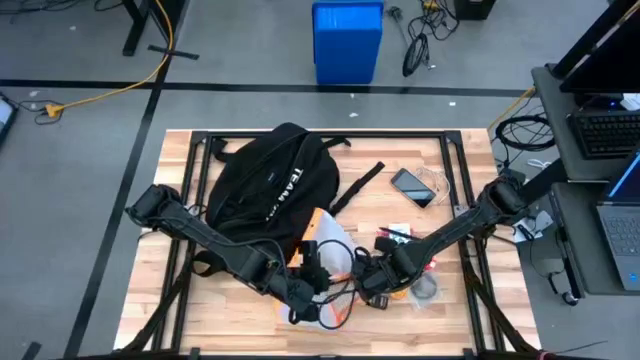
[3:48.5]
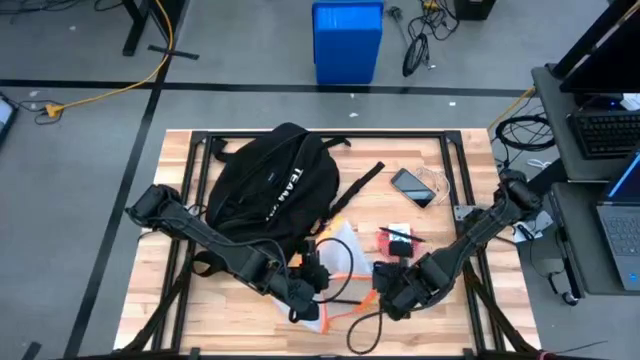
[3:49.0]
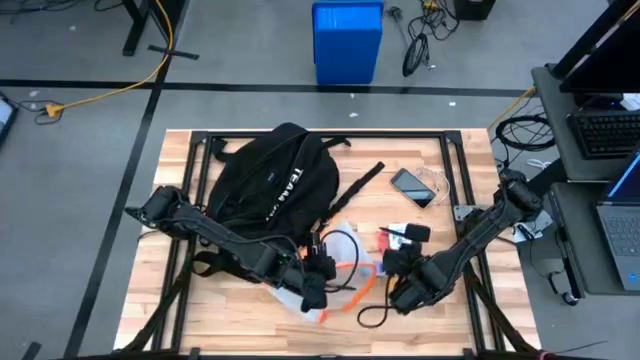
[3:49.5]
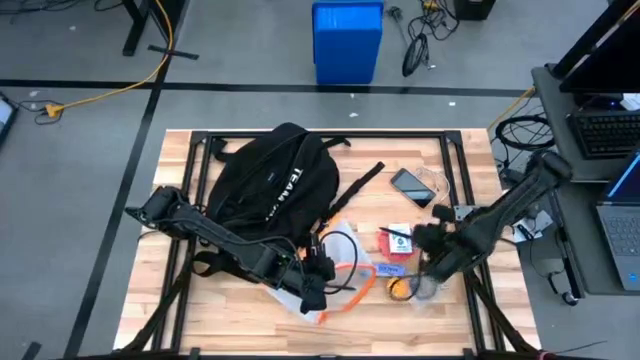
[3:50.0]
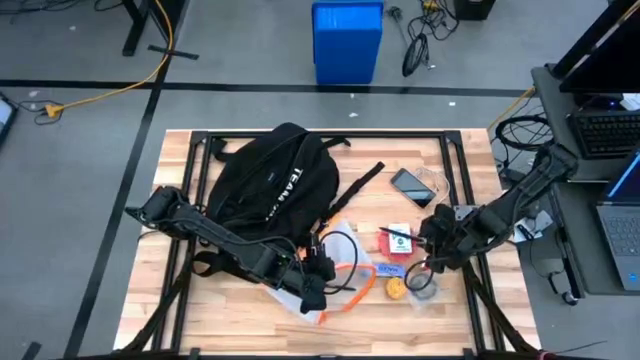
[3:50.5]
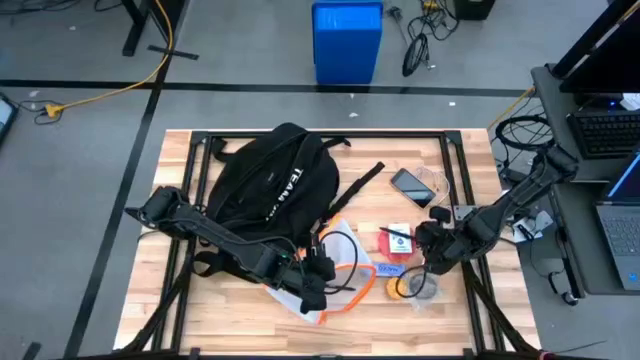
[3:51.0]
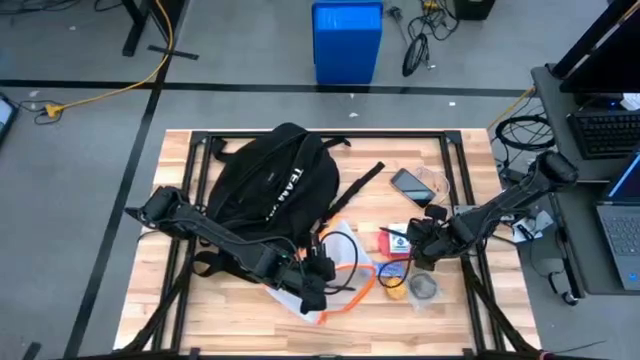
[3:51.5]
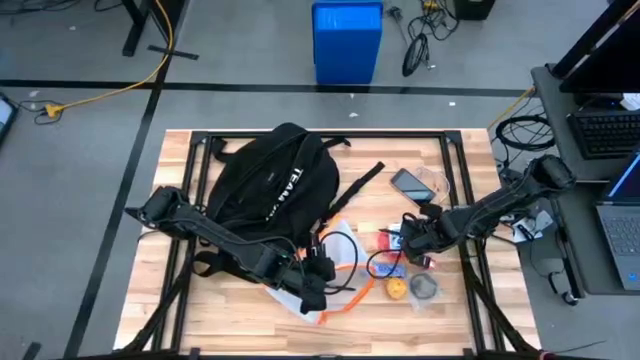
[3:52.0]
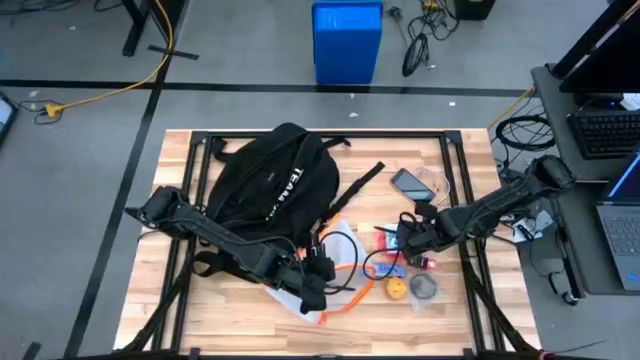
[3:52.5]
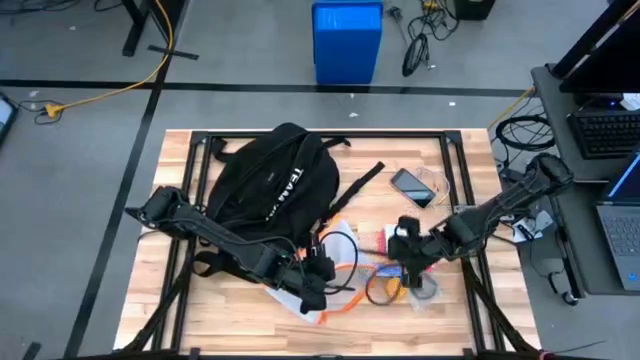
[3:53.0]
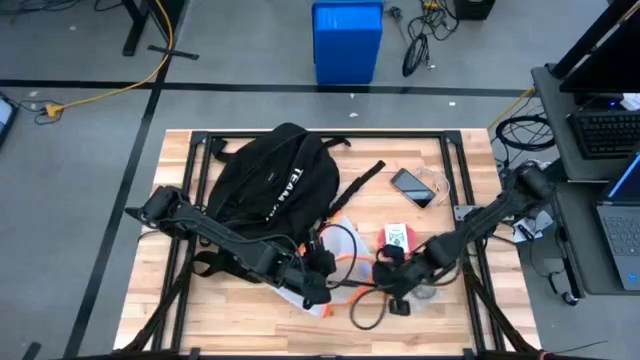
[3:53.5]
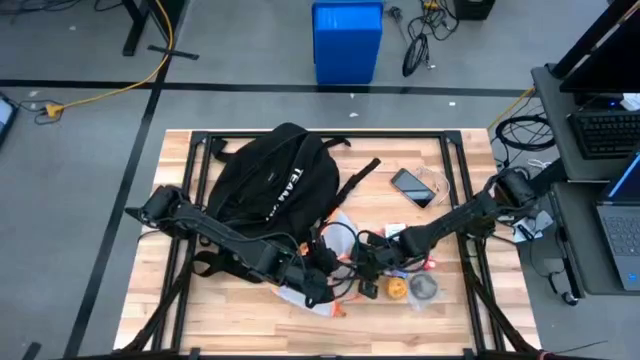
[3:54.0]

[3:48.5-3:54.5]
Task: Unpack backpack
Put the black pen into the orange zip bag

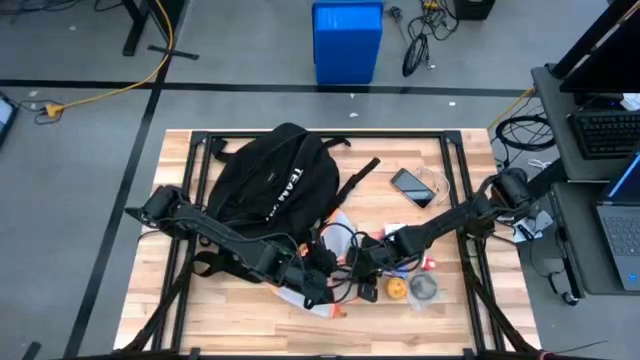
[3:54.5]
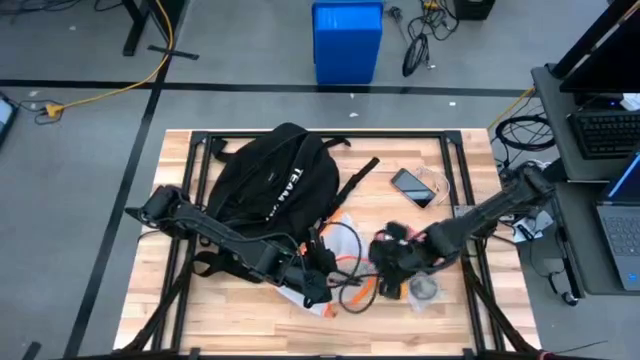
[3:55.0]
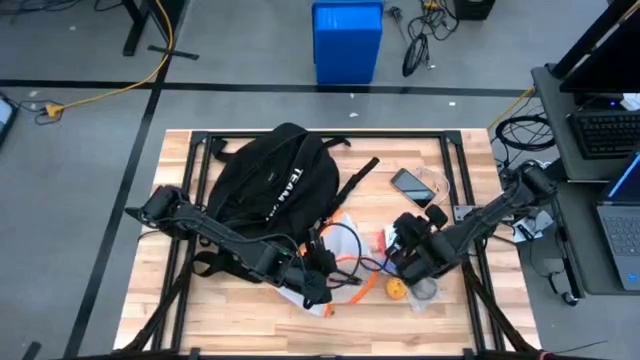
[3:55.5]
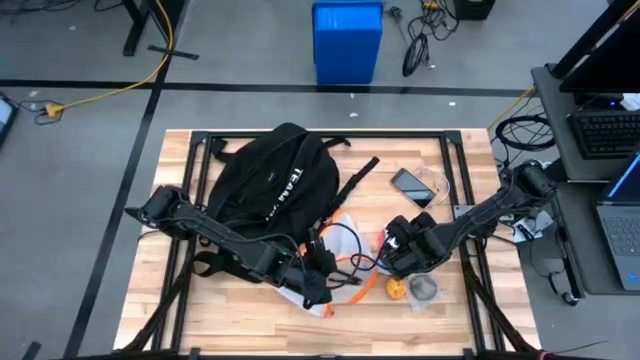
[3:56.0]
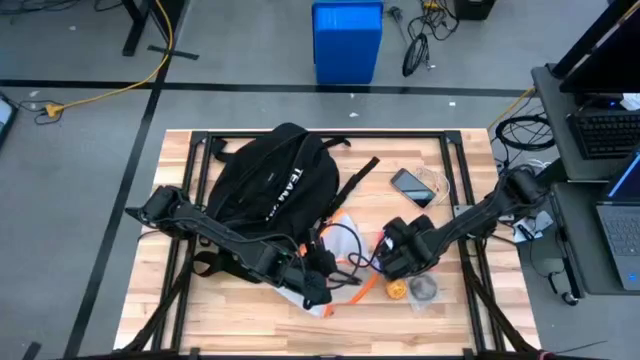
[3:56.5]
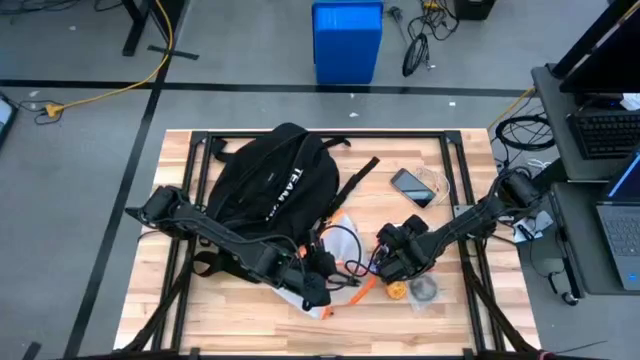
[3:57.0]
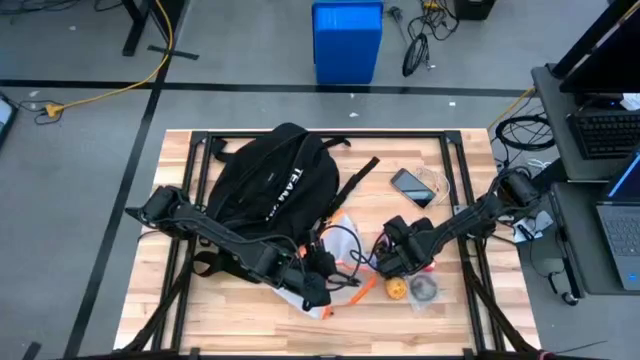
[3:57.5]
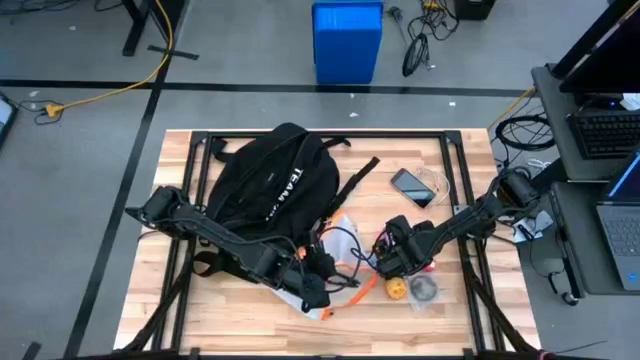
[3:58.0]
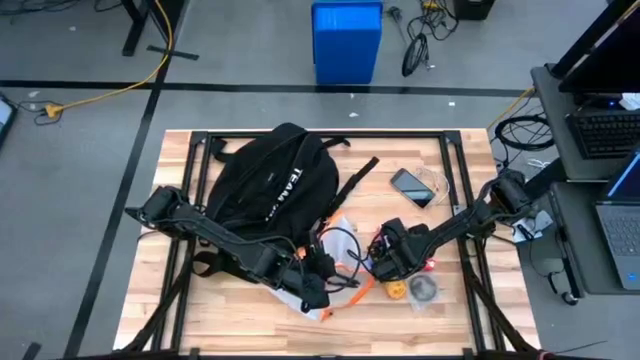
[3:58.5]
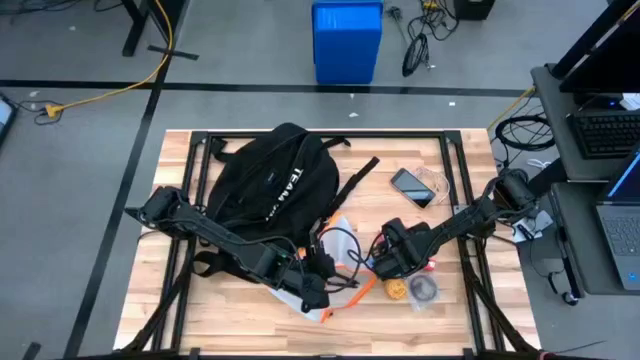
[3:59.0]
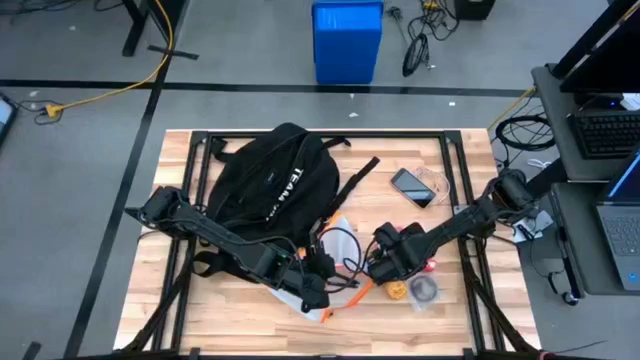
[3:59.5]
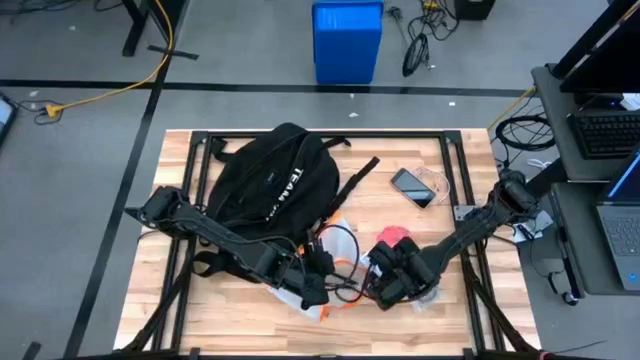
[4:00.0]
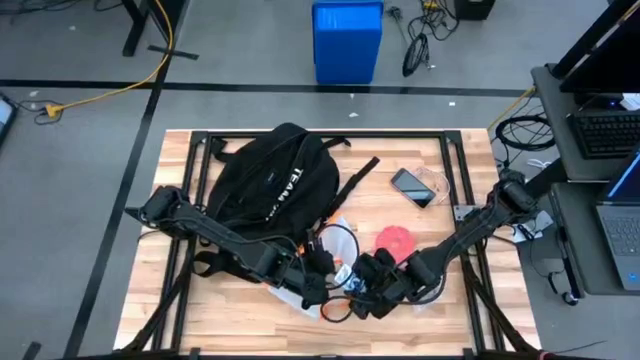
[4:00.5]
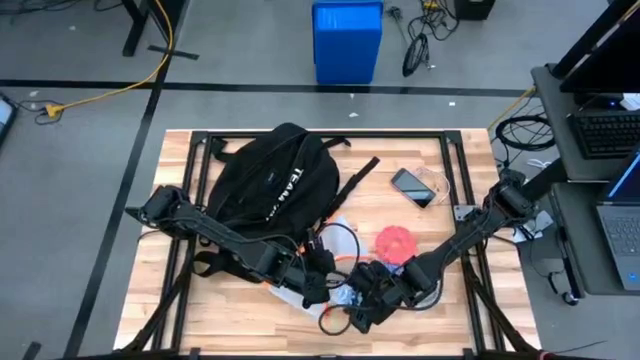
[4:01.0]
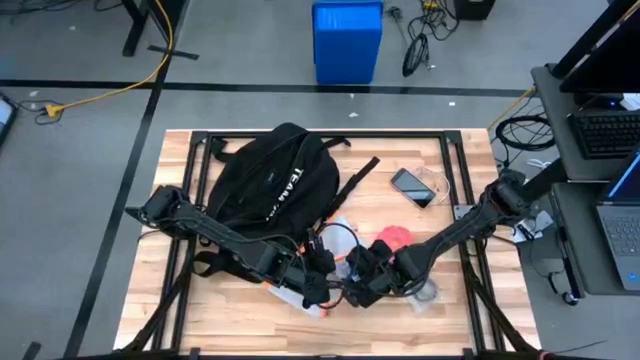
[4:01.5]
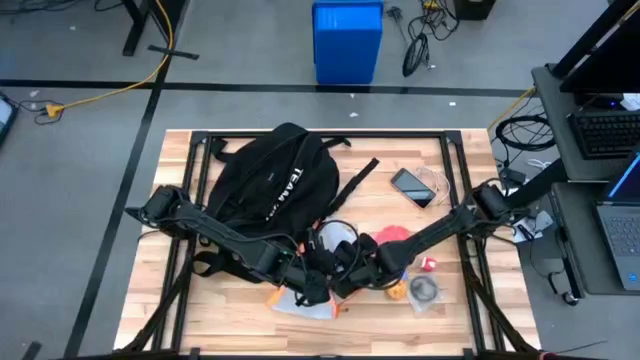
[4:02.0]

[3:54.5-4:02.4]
Put the card pack into the orange zip bag

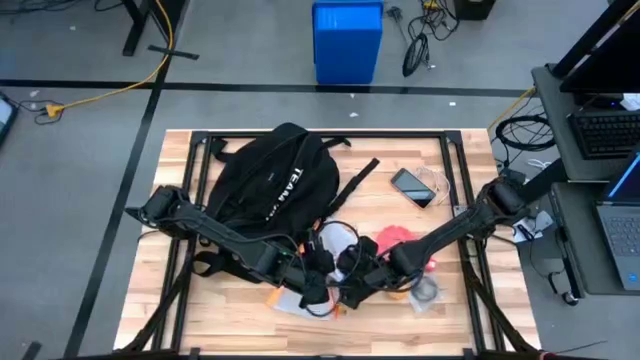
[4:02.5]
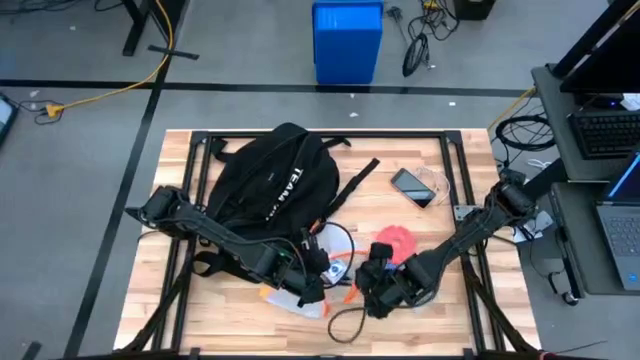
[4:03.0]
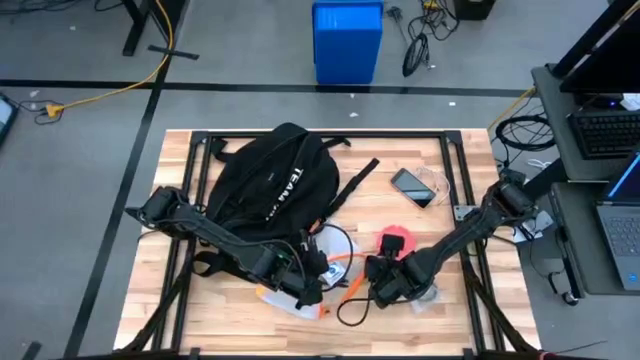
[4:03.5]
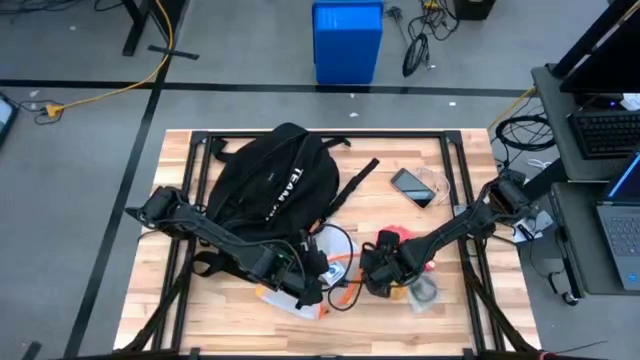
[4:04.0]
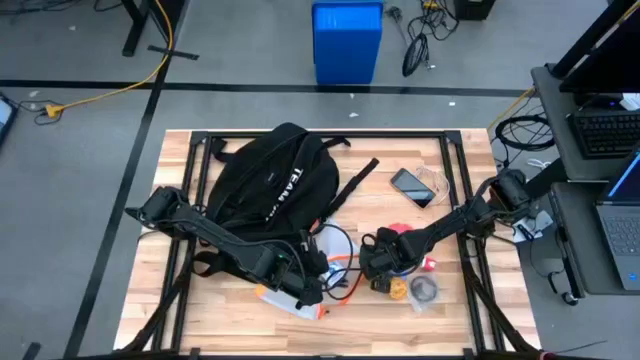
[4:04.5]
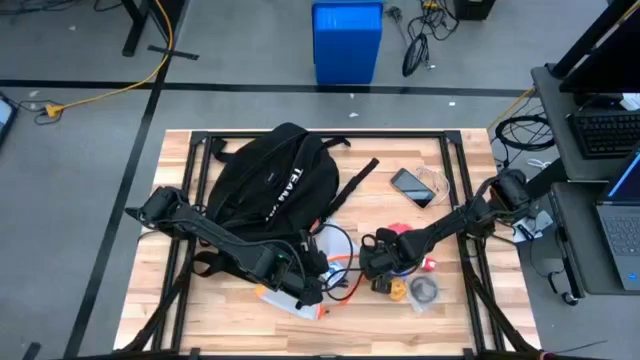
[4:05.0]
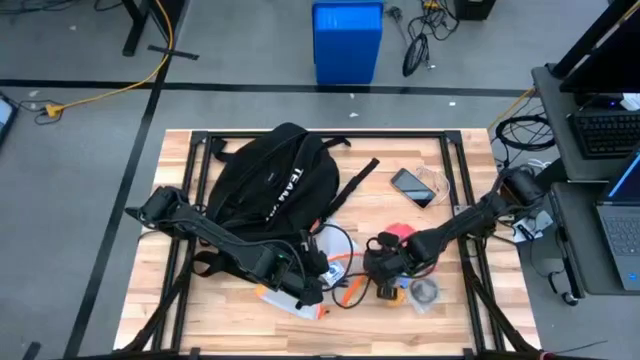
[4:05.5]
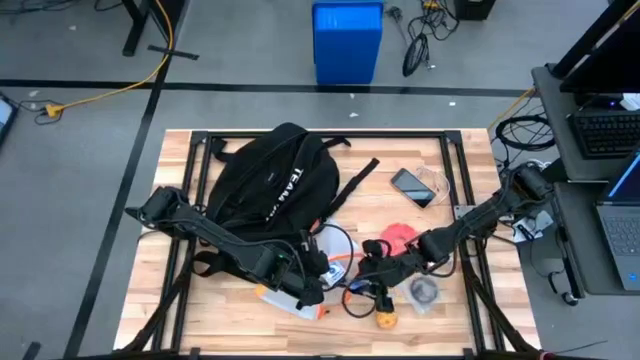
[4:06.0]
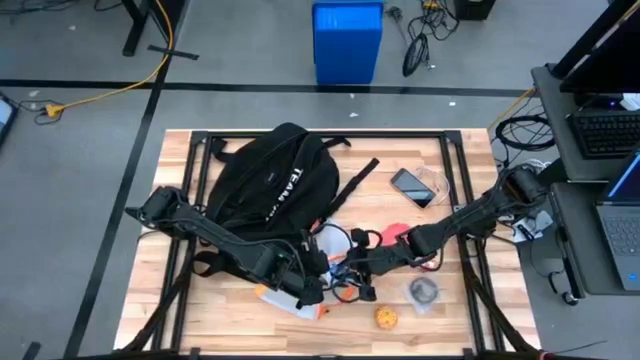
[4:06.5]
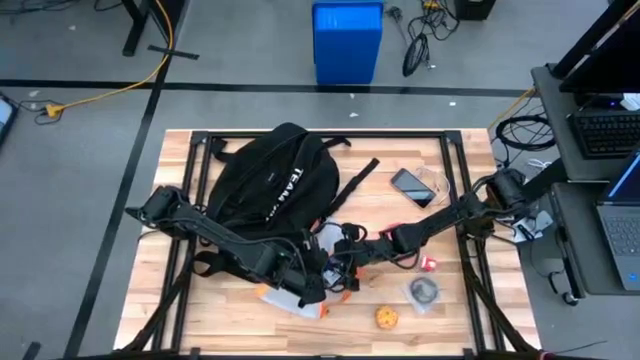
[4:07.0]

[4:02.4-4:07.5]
Put the candy bar into the orange zip bag

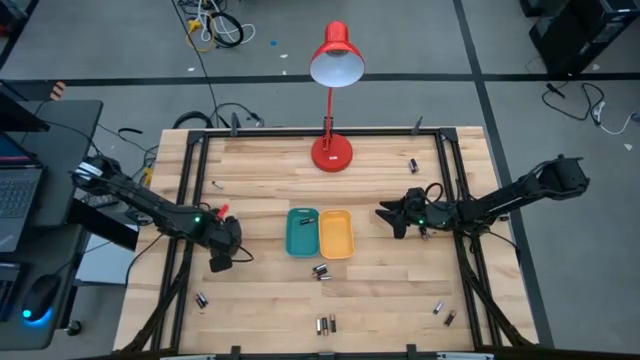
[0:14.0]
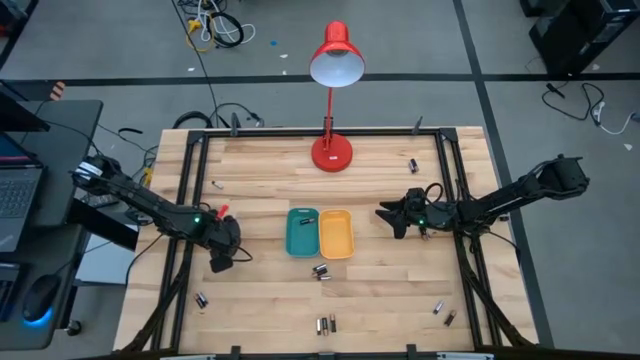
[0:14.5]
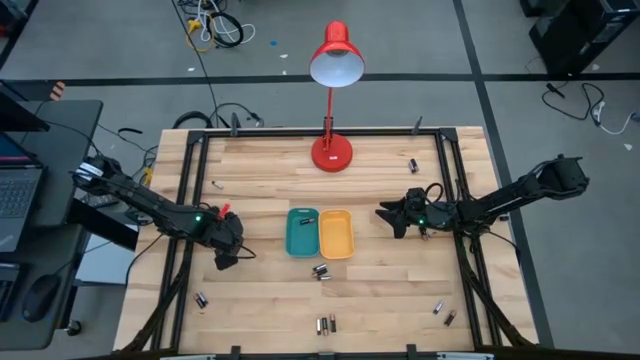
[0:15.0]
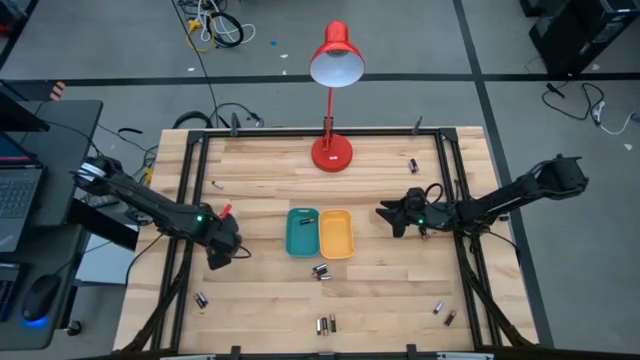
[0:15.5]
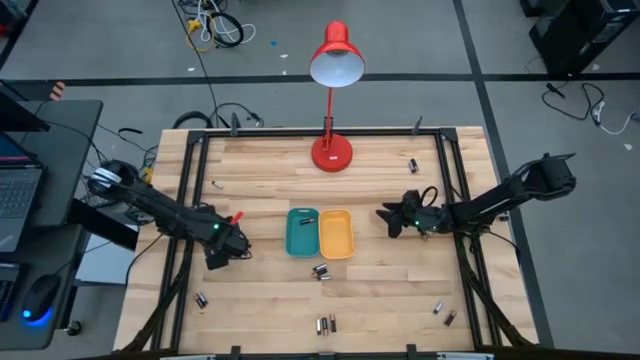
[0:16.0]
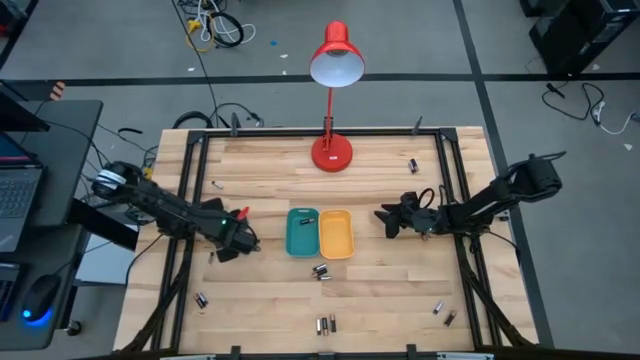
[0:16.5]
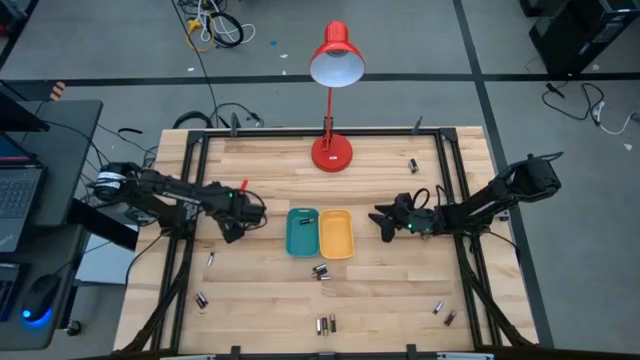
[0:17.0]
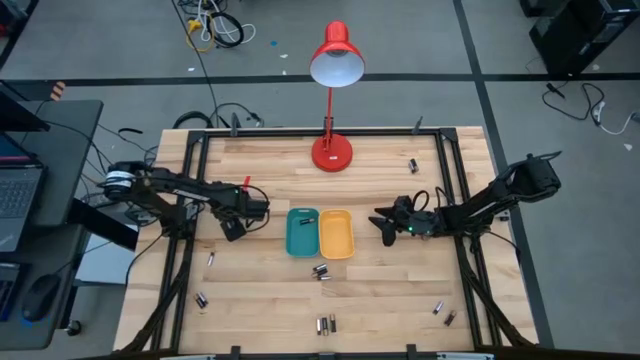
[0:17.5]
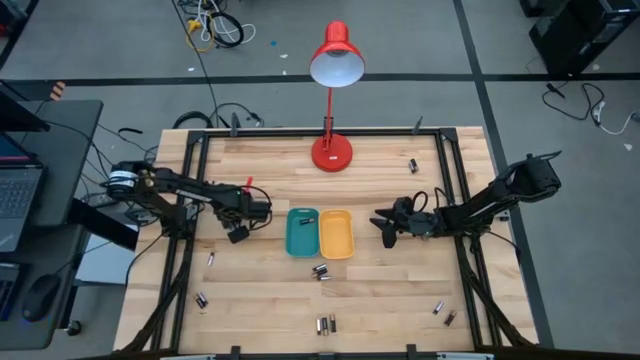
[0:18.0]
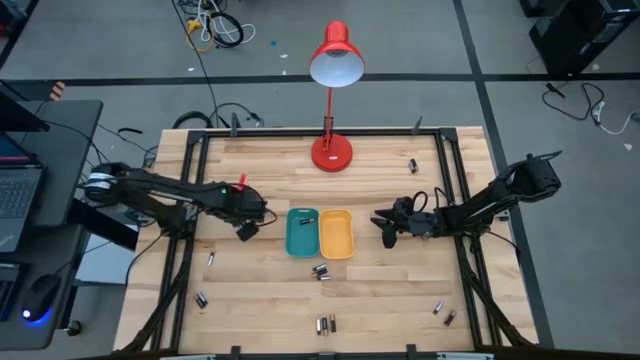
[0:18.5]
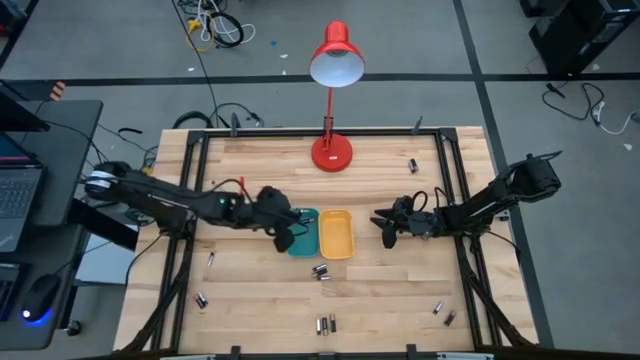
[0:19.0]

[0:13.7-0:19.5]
Task: Sort batteries
Put the black battery into the blue bin
